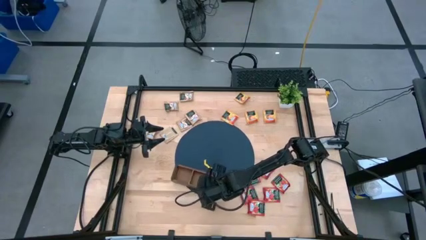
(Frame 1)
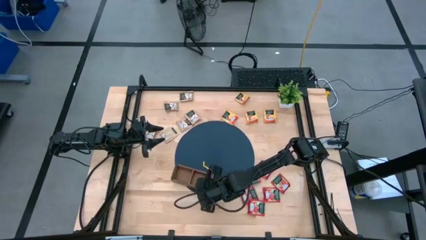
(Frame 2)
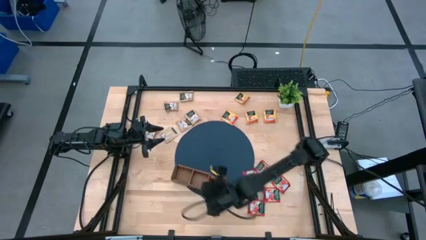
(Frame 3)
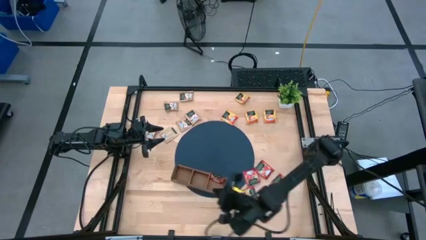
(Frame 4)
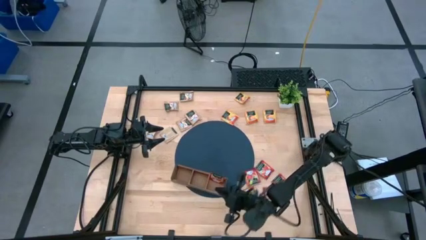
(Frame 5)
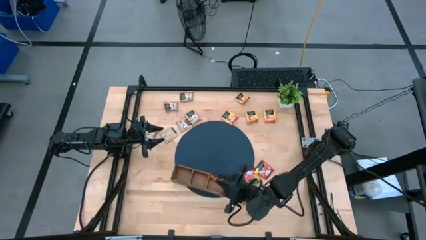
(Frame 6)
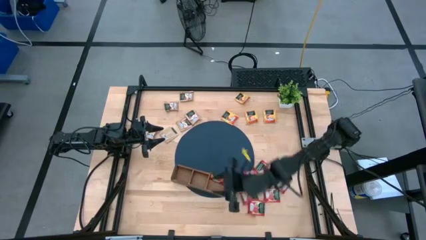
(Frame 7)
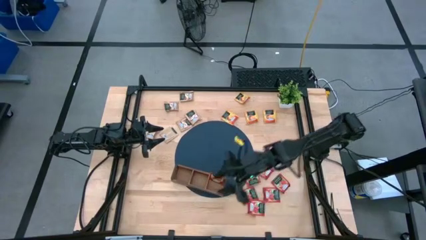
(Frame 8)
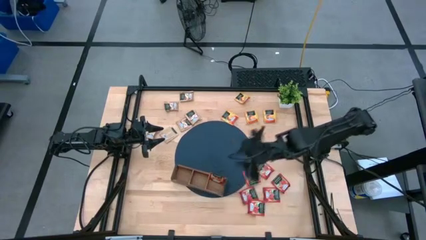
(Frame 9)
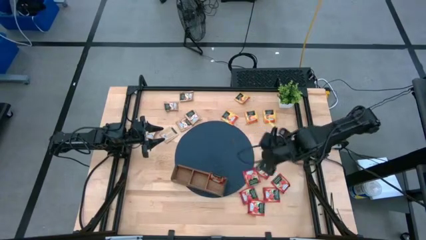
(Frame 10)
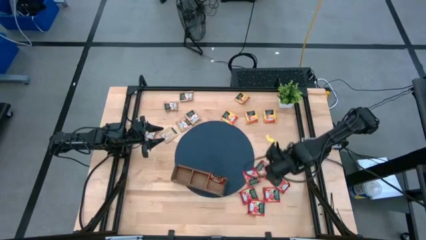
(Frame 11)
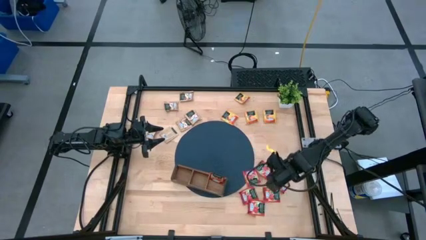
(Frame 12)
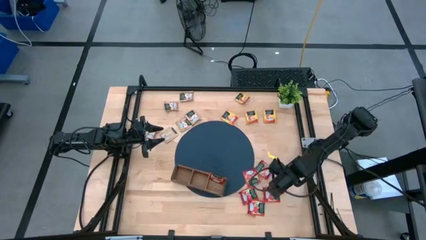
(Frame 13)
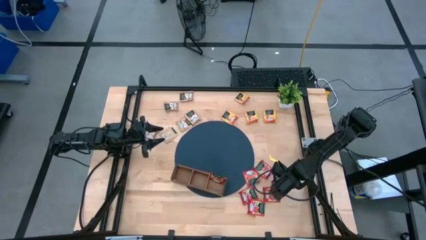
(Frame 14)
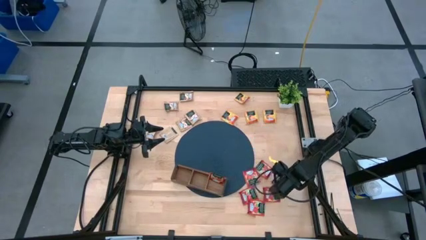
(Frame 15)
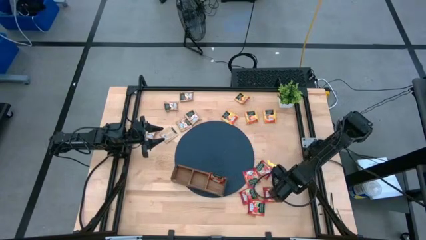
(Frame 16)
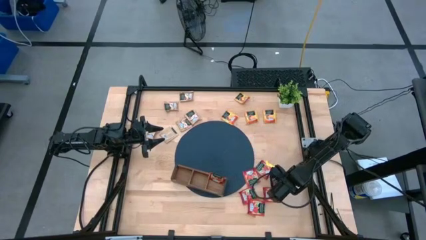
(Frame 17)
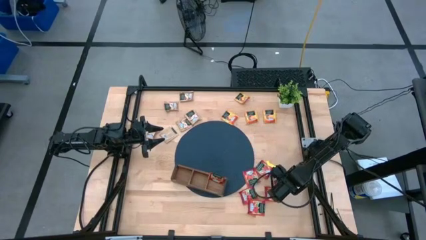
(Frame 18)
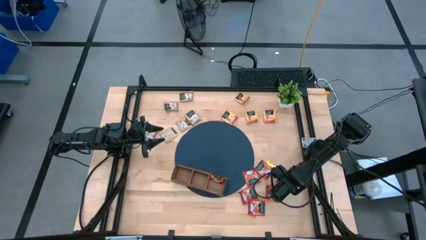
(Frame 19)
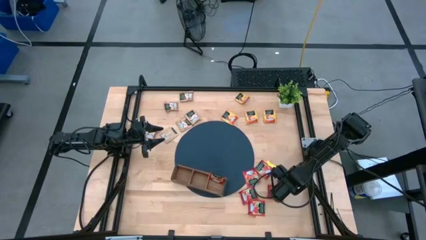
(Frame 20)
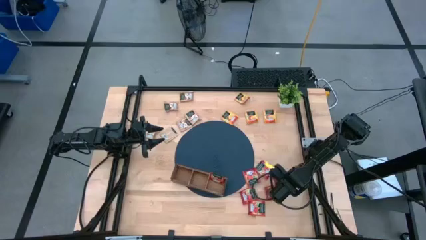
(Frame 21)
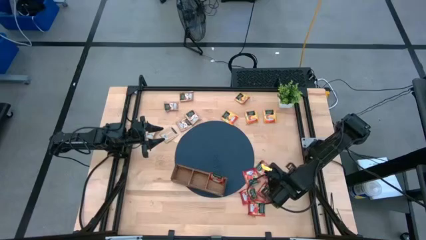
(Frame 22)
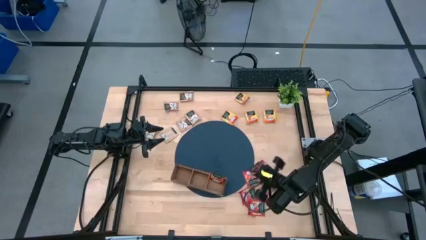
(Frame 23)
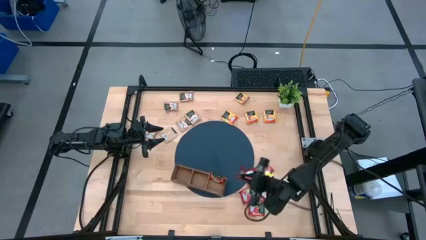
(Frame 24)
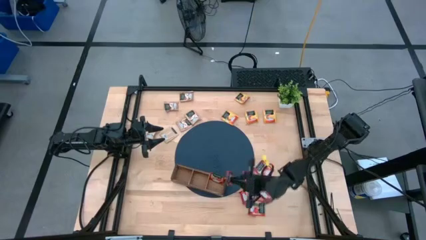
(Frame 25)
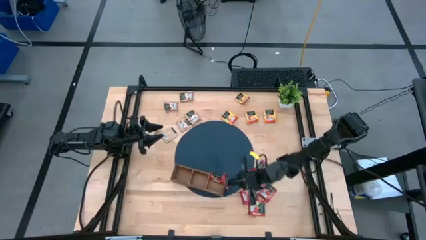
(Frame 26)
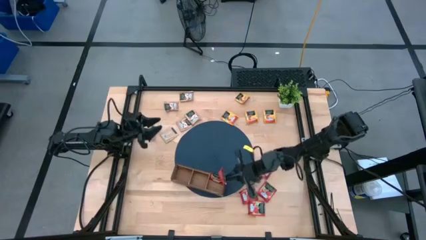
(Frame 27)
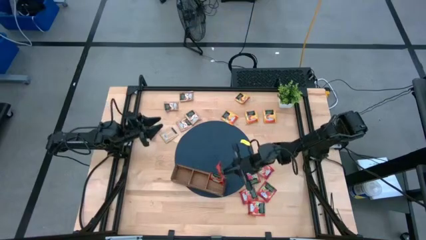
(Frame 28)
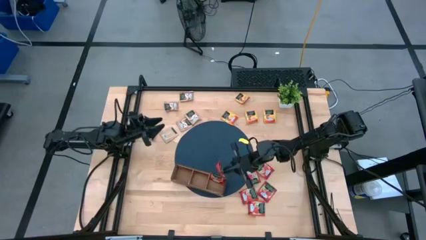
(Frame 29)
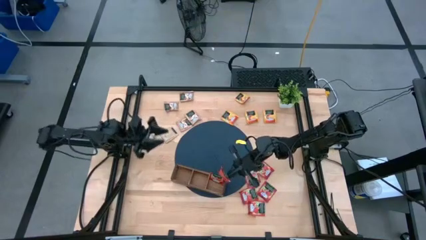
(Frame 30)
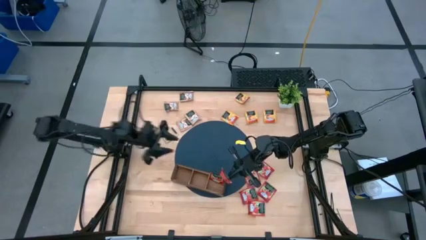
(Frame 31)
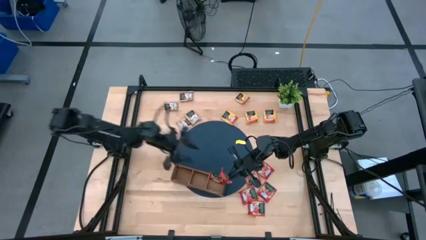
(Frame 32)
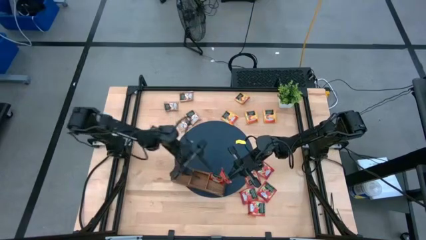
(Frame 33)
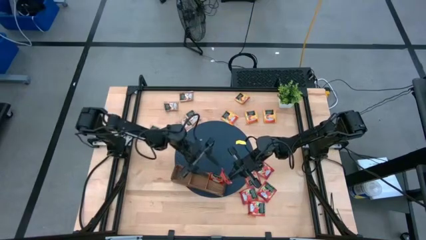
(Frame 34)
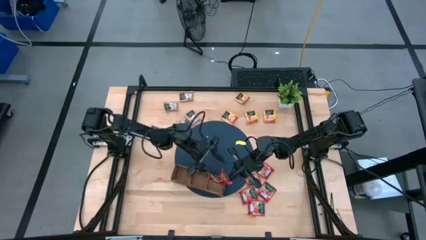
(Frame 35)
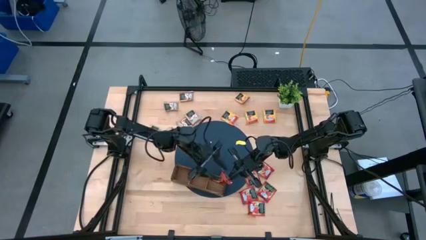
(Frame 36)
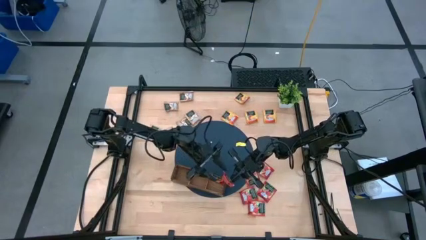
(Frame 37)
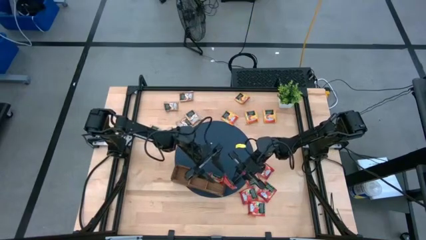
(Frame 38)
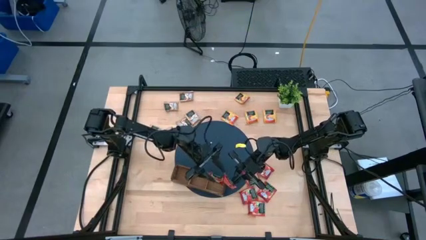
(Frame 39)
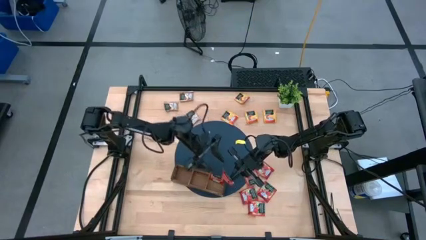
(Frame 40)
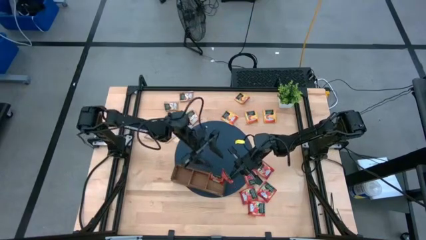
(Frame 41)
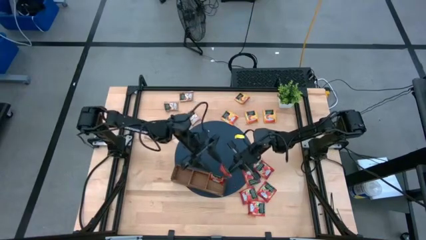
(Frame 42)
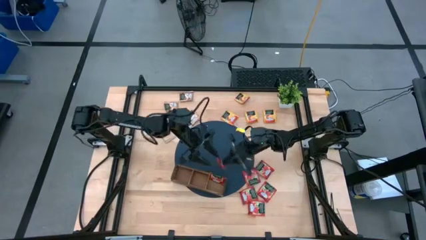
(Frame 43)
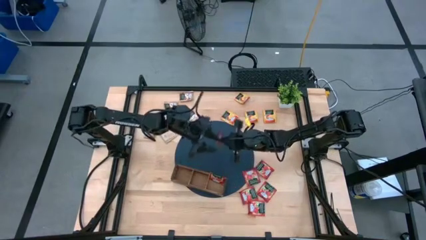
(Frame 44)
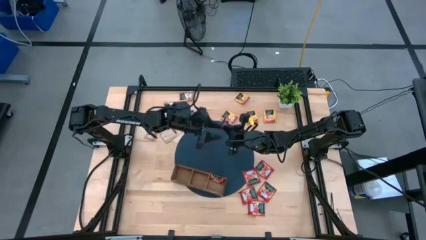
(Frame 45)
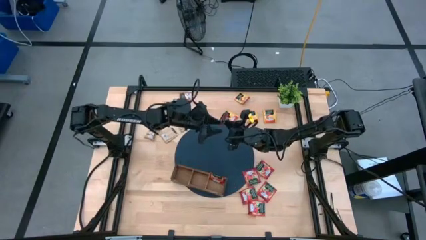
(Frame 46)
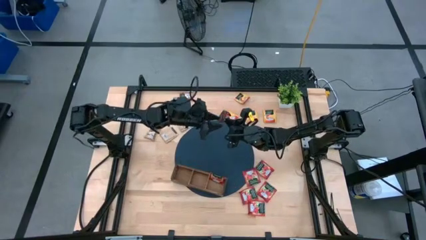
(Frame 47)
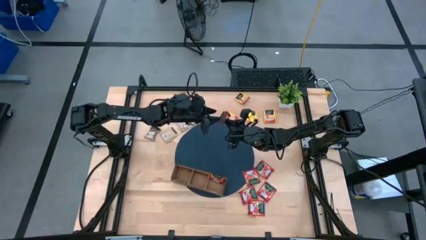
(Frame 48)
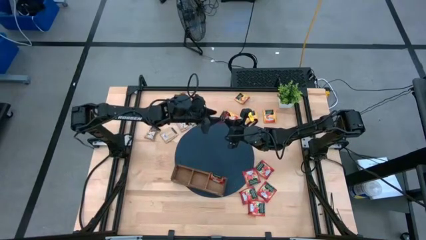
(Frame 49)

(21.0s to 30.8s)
Task: Pick & Place Tea
Put the red tea bag into the right section of the wooden organizer

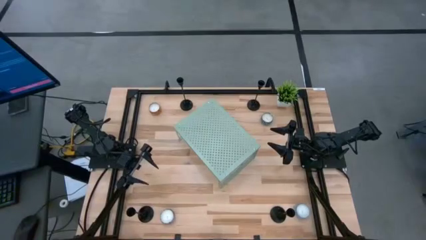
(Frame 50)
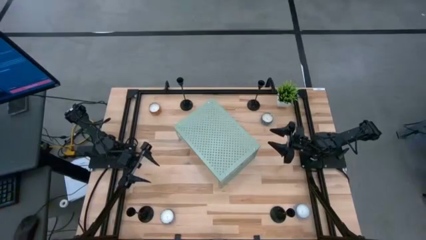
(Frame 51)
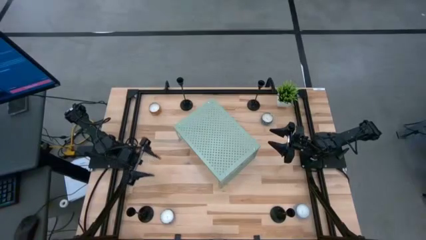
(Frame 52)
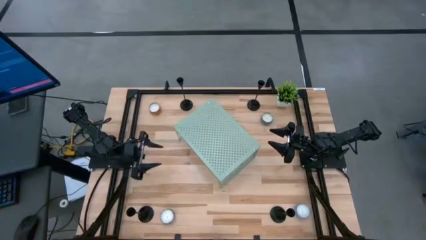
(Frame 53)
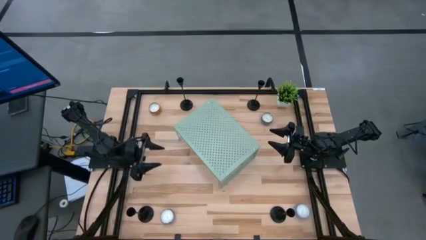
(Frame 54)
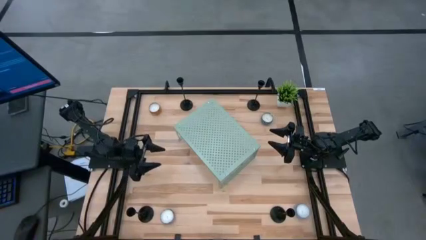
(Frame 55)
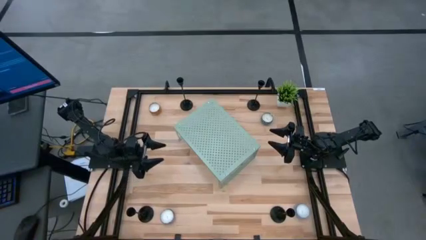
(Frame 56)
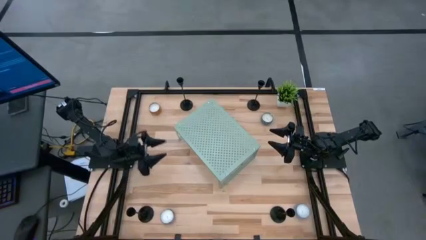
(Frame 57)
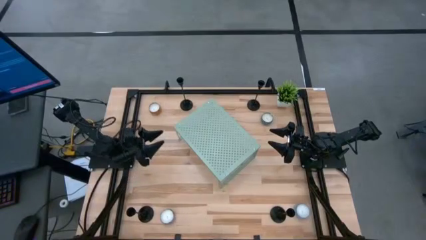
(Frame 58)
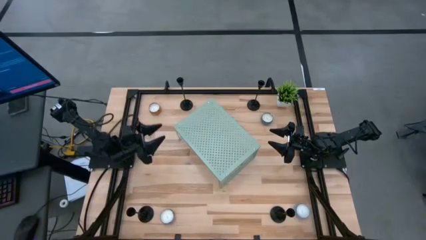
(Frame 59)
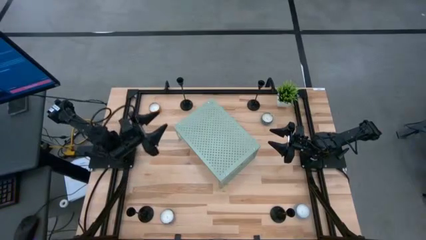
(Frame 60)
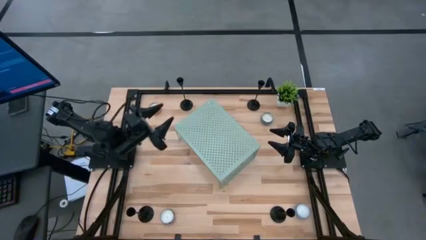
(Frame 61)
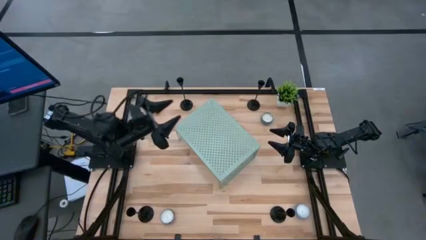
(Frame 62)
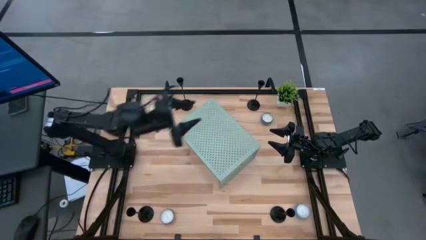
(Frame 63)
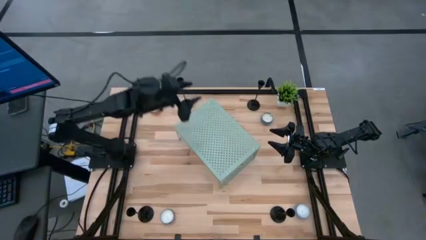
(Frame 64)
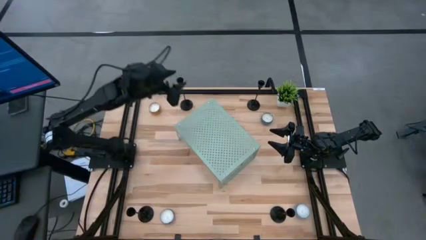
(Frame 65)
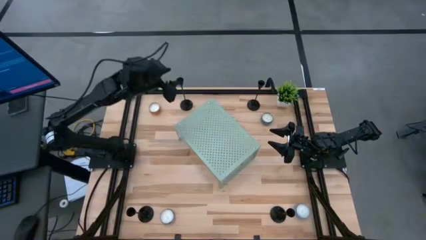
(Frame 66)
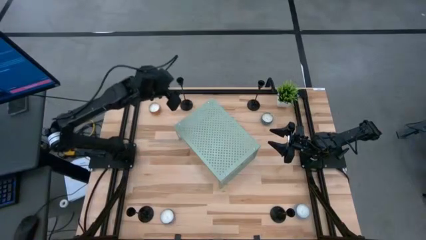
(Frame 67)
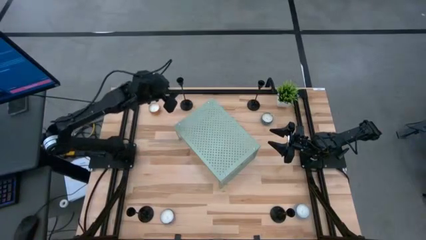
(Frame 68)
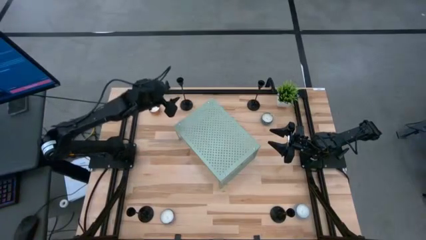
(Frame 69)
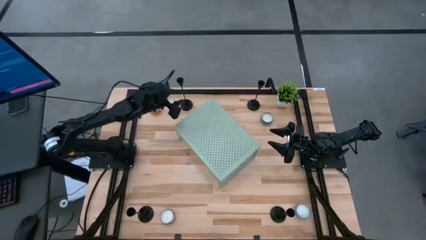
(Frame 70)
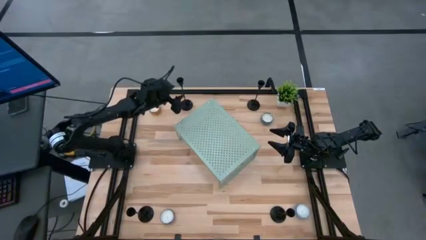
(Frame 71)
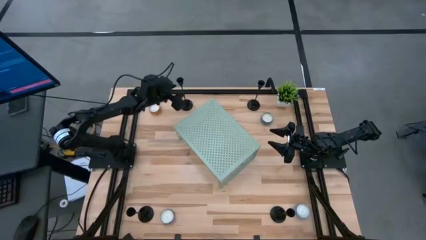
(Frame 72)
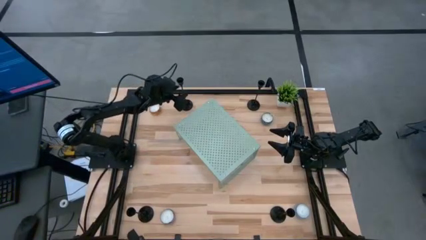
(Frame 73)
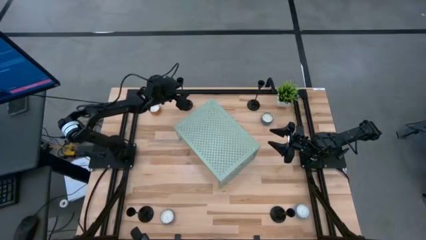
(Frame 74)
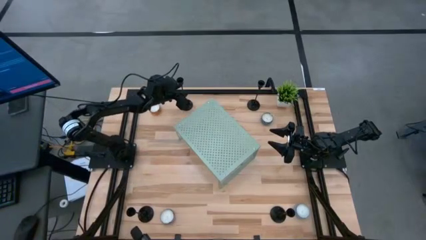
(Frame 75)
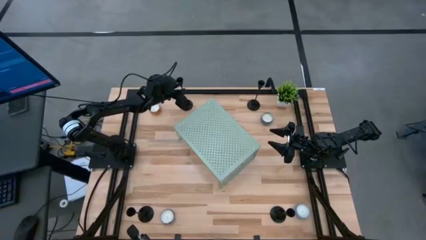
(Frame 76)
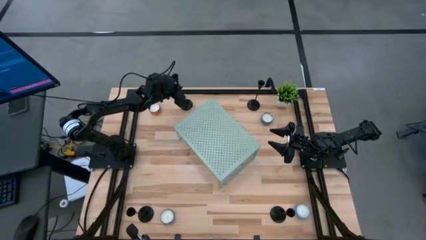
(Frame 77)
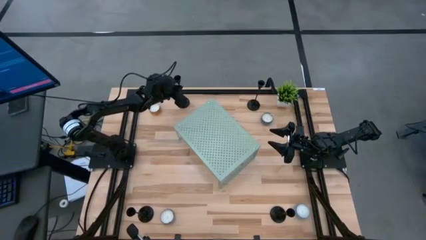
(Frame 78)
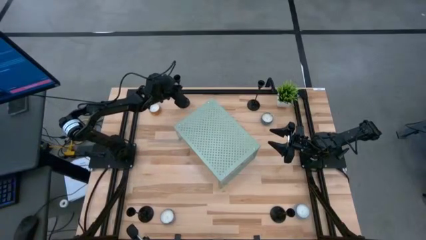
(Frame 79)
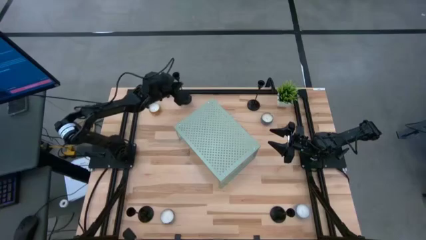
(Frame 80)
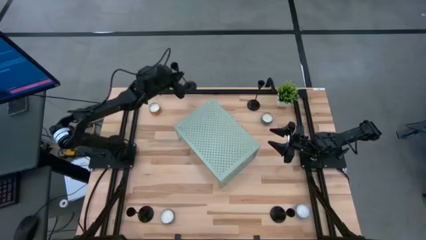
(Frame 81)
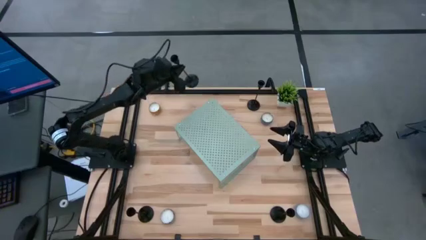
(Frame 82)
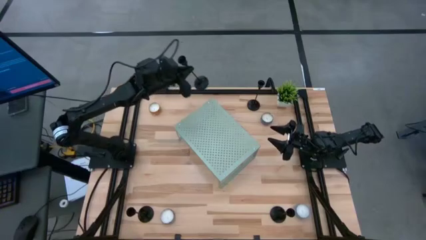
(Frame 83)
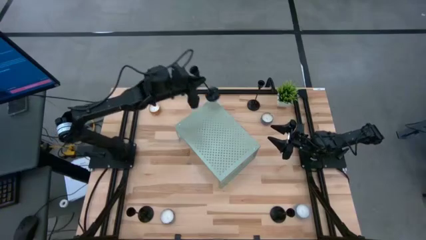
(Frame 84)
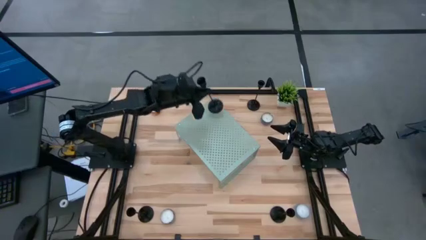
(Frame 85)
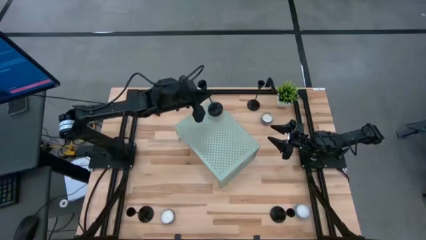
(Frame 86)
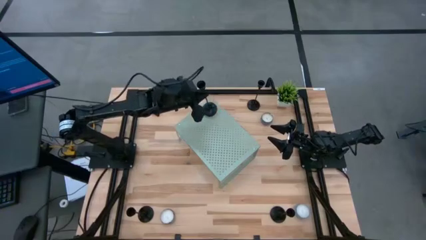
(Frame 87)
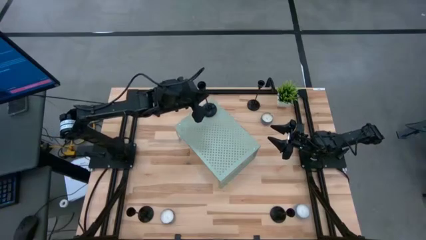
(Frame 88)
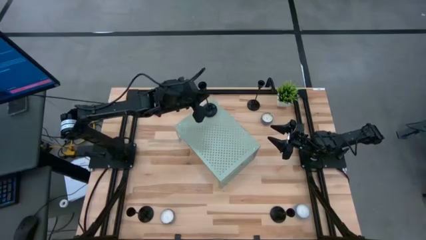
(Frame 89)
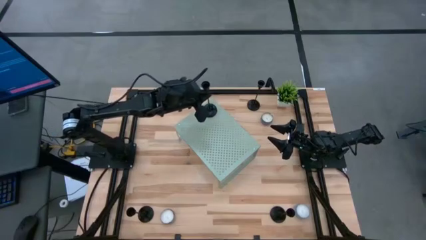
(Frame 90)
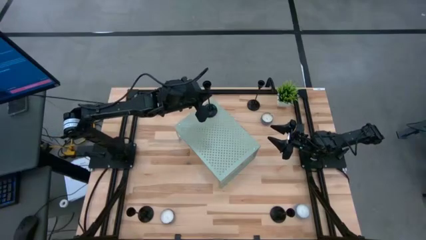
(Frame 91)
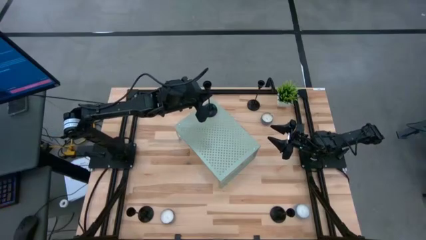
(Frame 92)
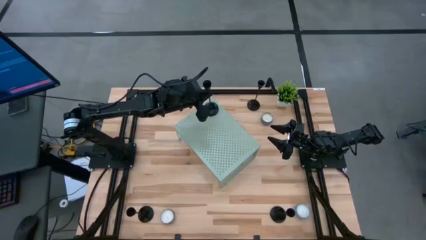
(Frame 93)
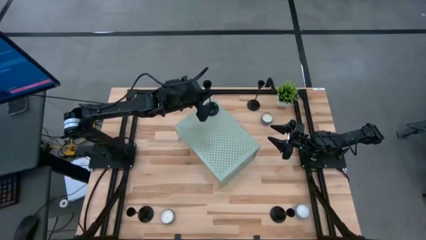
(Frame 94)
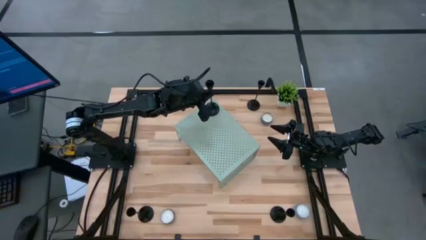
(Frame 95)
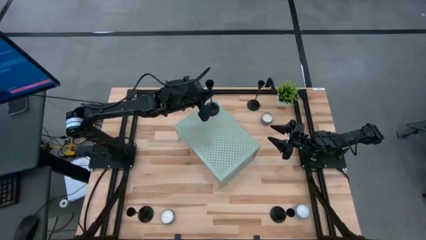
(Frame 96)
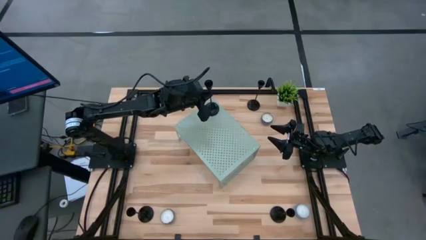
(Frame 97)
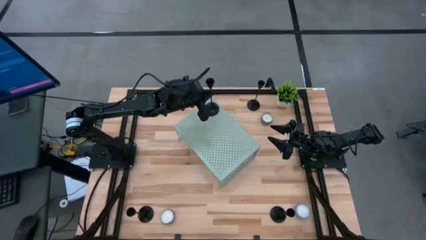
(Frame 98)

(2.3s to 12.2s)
Task: Pick & Place candle stick holders
Put the top left black candle holder on the shelf
